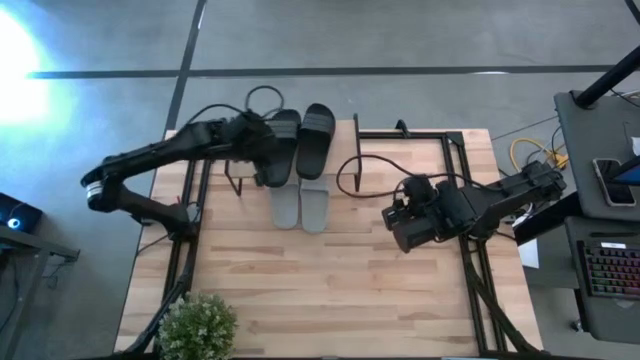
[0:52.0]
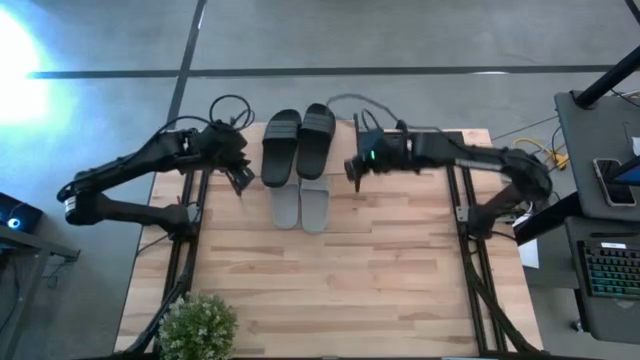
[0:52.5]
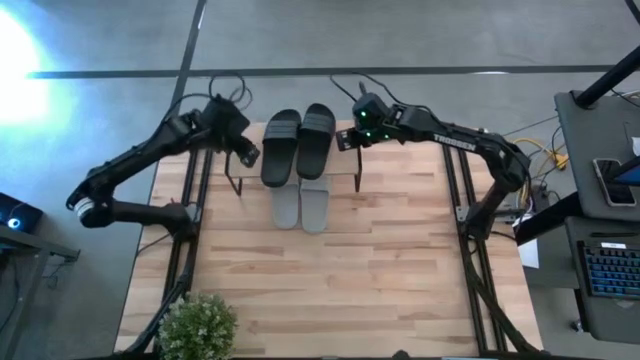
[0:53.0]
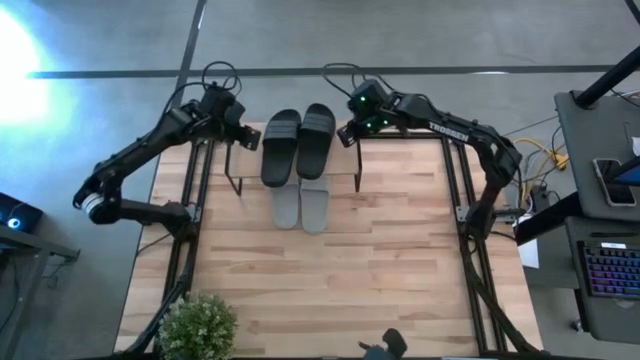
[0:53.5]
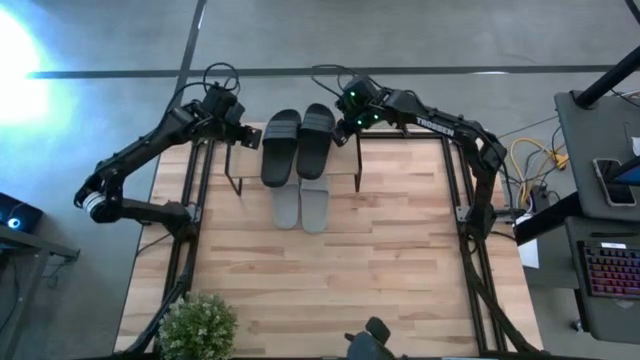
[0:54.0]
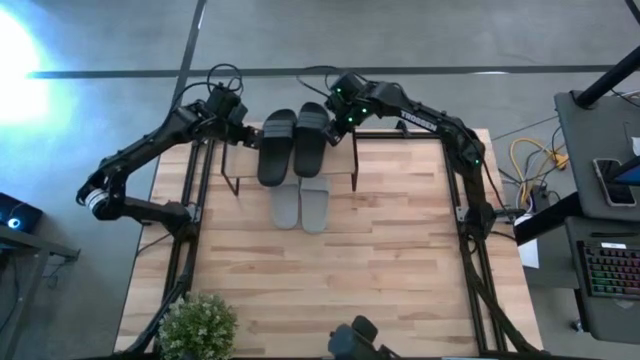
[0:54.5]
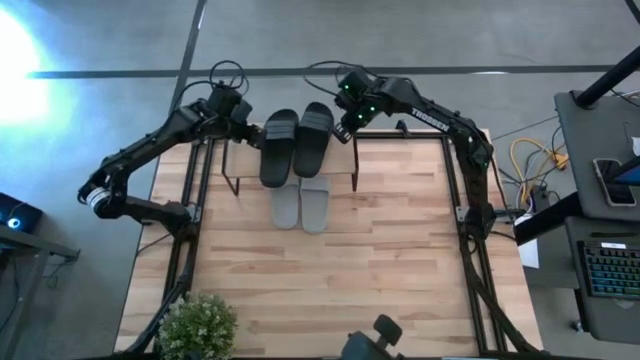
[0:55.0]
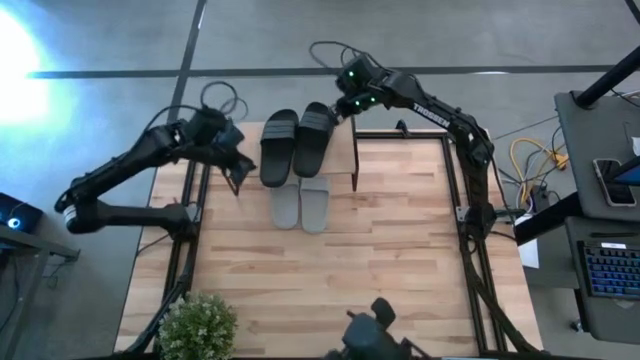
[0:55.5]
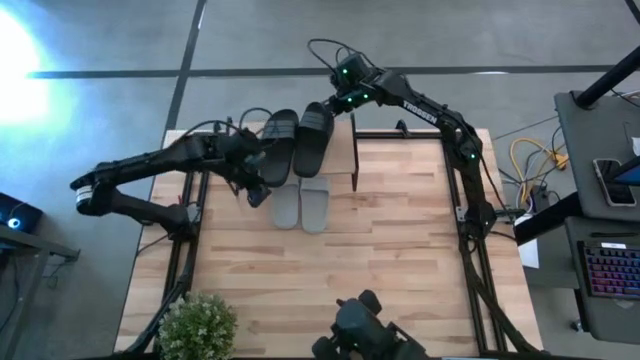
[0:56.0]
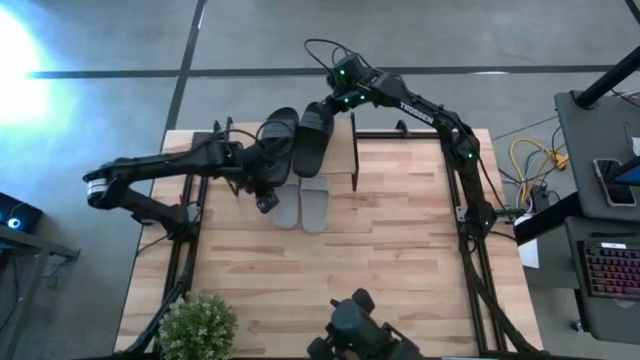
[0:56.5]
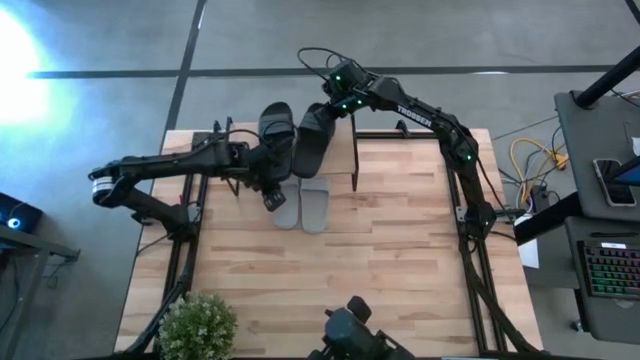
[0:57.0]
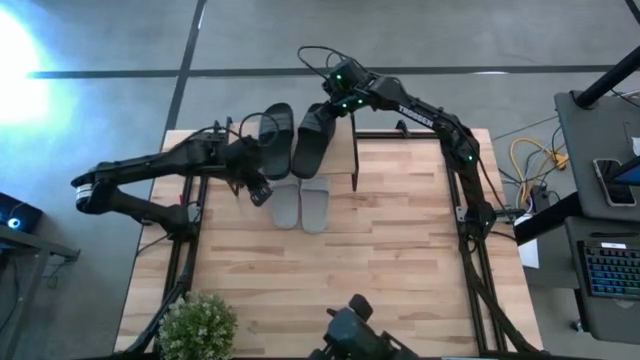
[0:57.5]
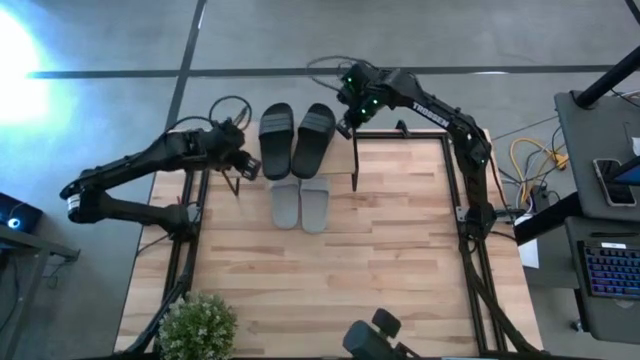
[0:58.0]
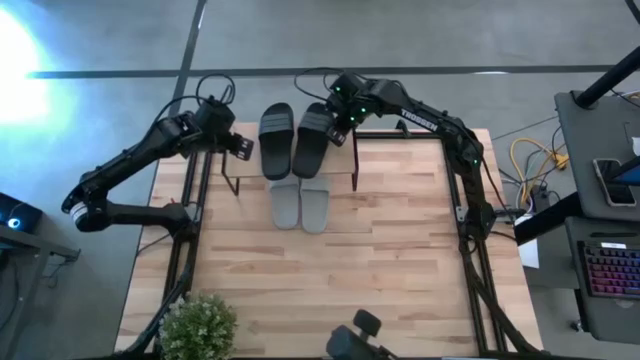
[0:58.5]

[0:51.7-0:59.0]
Task: Pick and place slides into the shelf
Adjust the black slides on the shelf

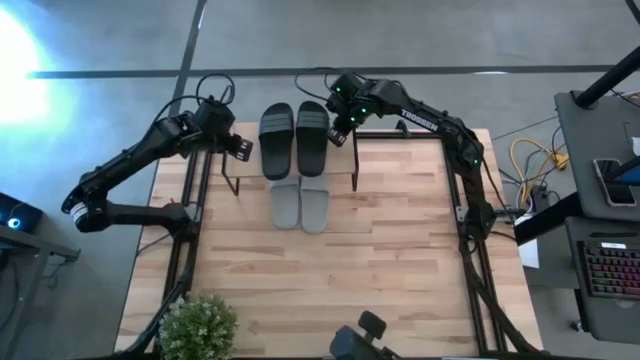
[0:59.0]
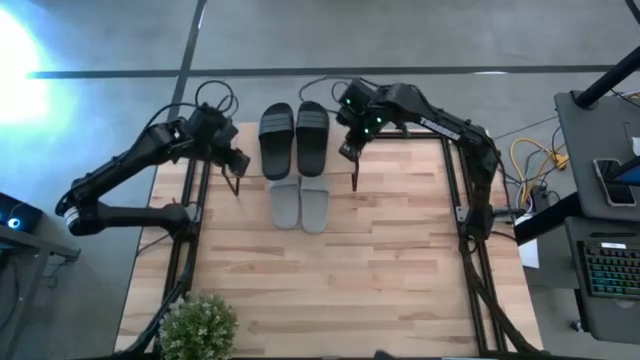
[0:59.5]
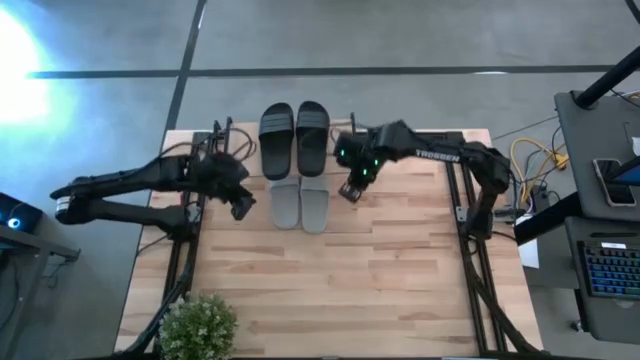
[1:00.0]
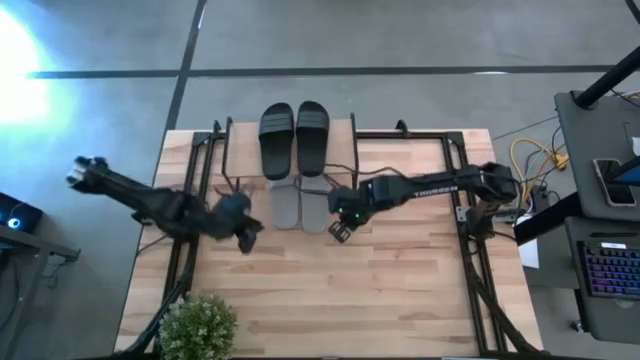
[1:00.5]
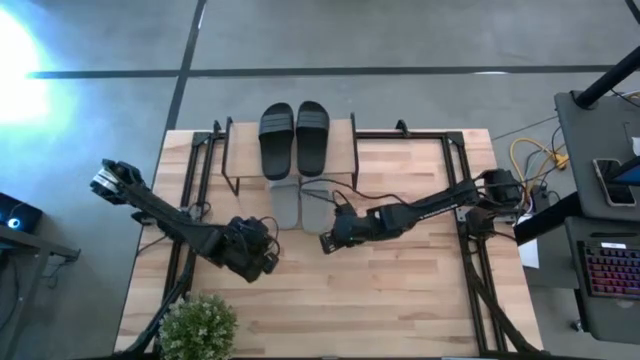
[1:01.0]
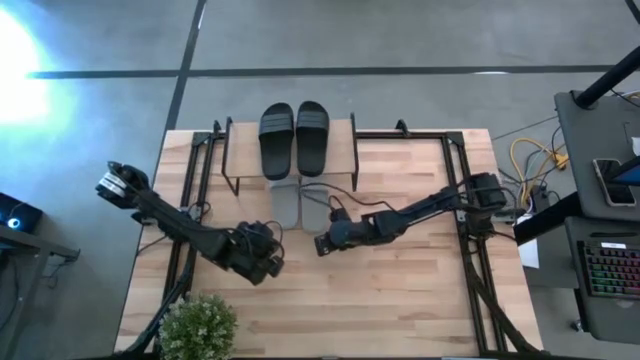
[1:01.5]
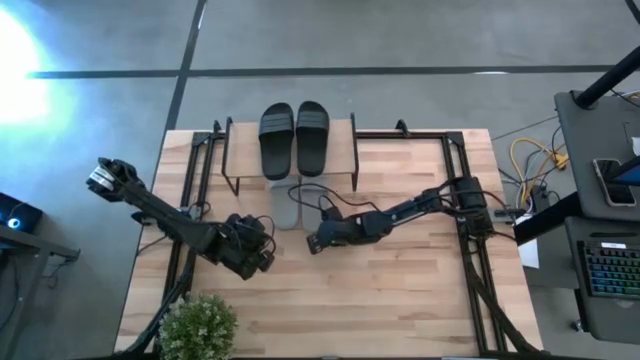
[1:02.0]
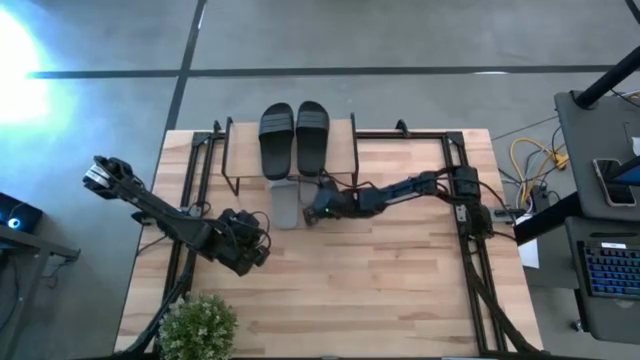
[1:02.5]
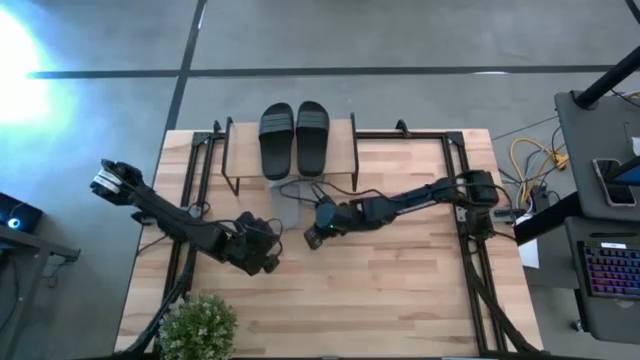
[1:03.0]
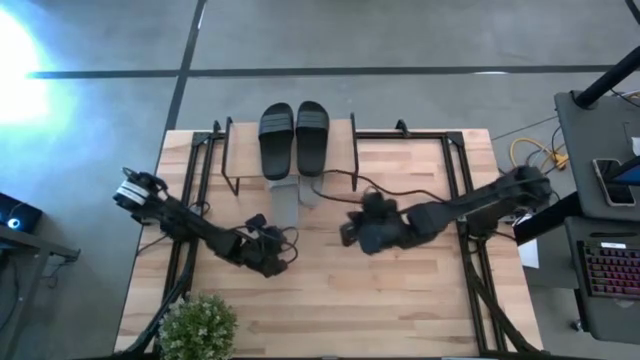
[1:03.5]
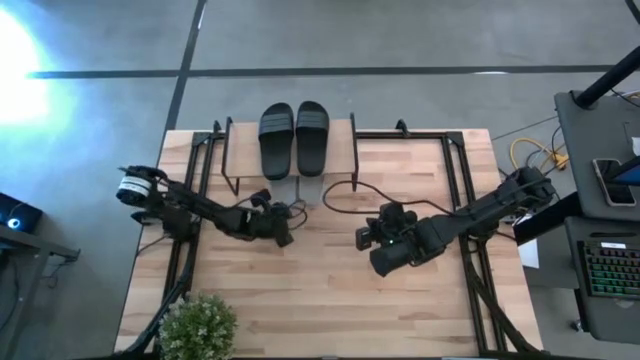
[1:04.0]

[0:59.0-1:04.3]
Adjust the gray slides under the shelf

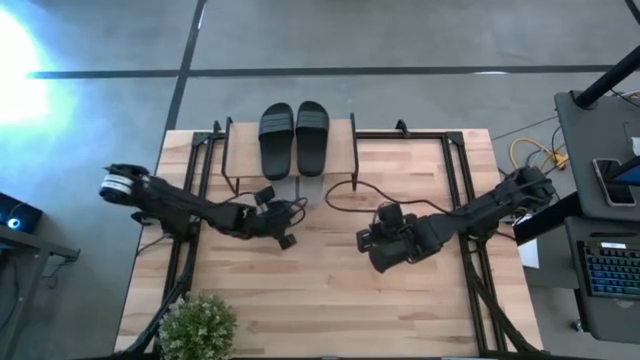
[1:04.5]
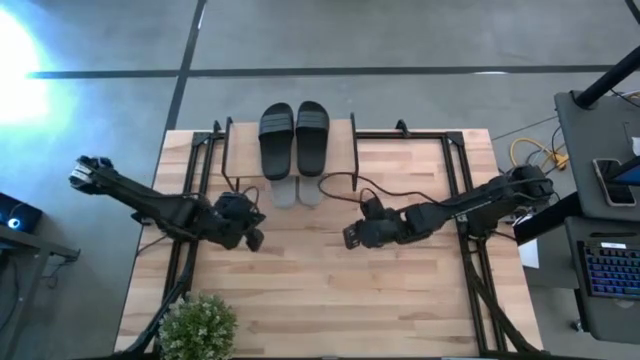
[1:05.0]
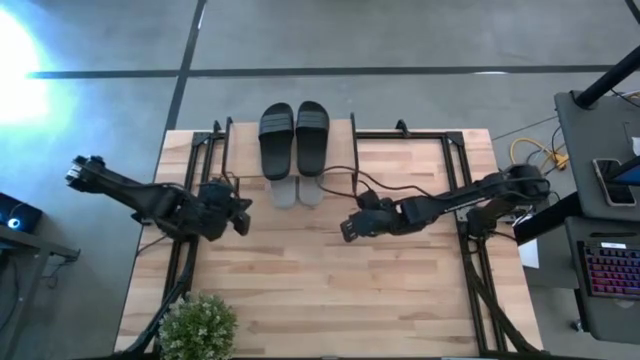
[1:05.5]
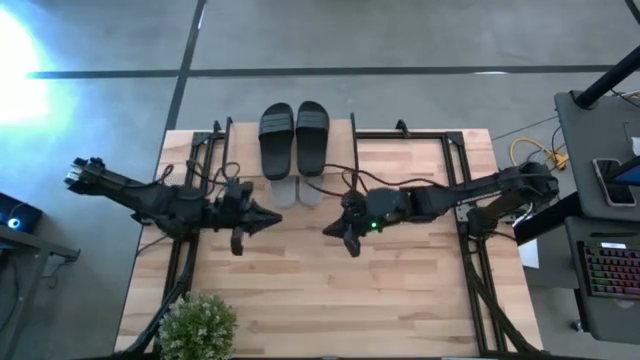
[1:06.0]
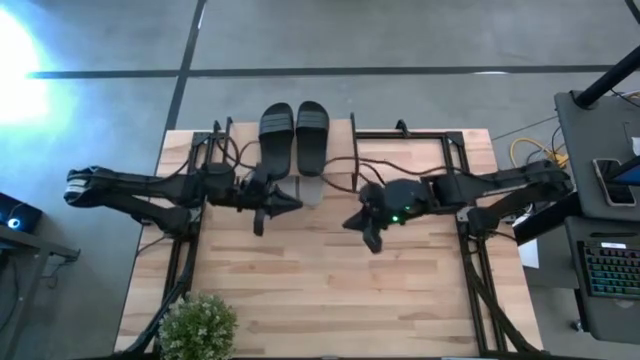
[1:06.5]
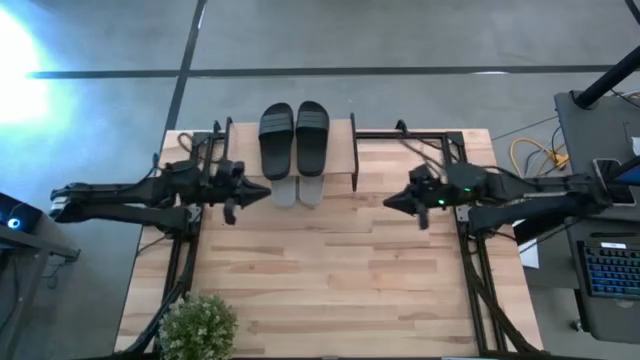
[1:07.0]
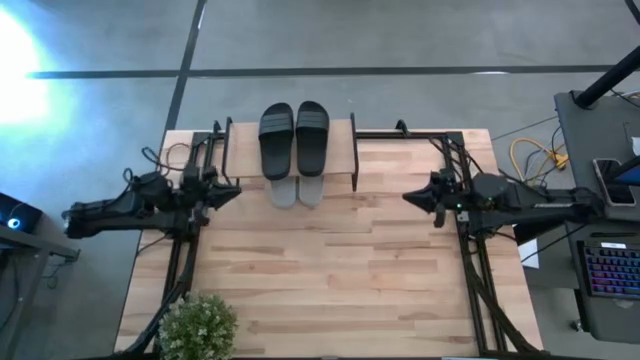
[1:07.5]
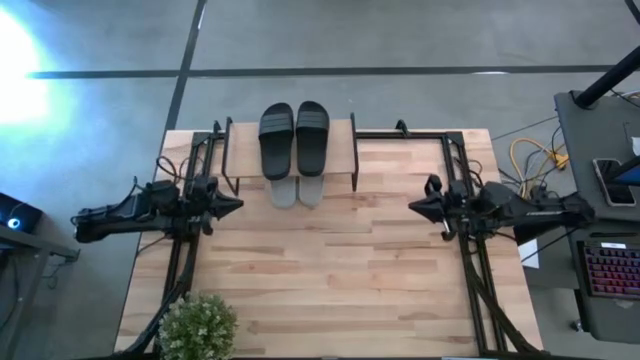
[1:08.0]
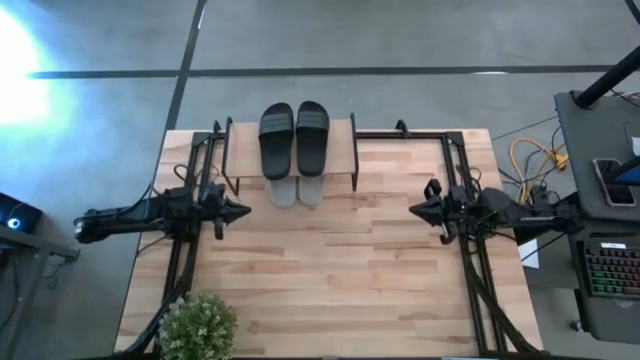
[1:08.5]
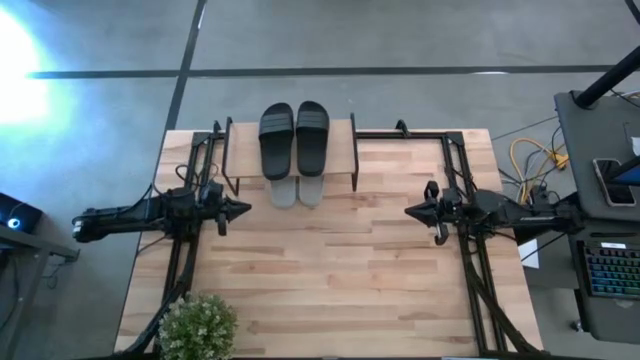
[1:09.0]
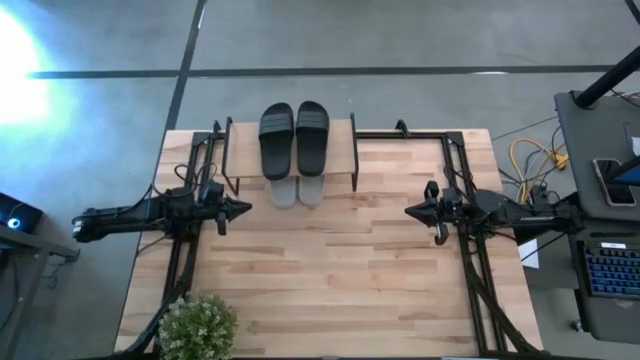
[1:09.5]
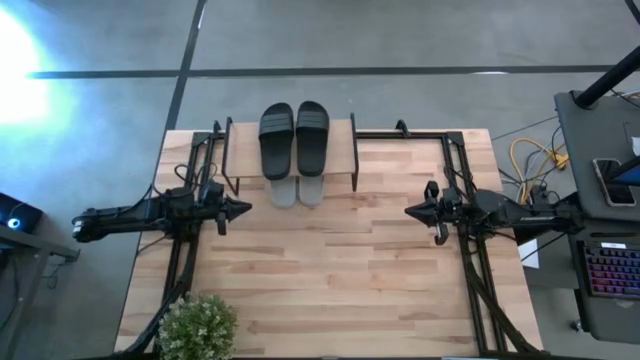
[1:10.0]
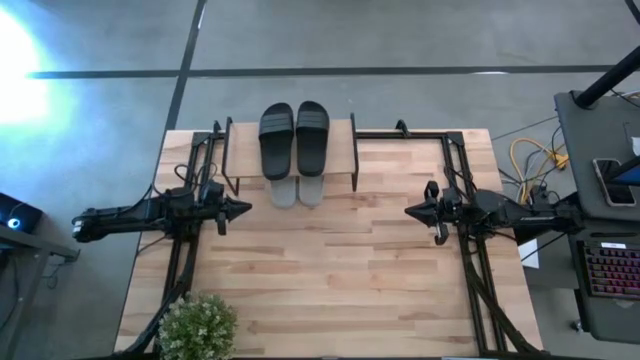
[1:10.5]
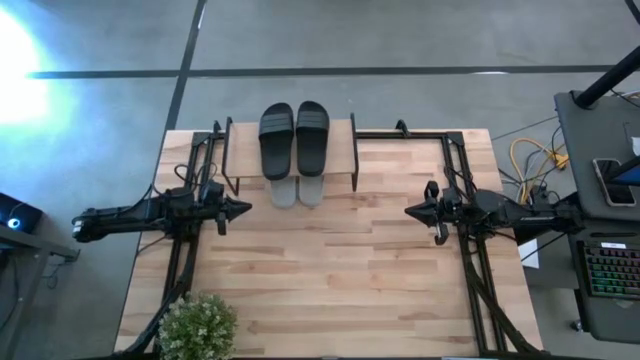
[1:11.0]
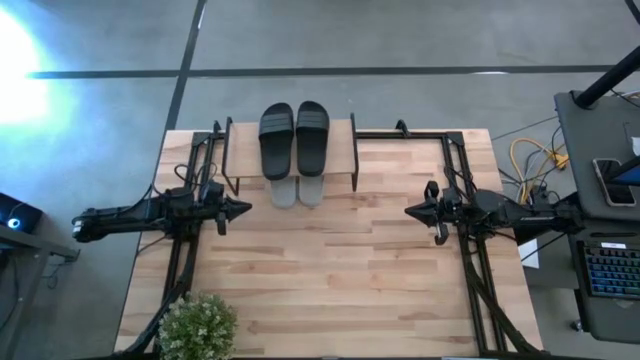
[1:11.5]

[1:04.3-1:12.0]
Return to Home Position

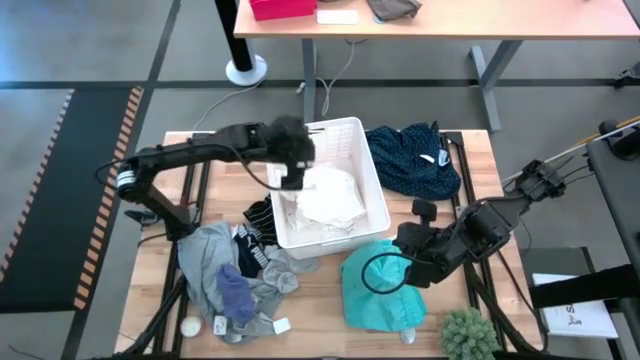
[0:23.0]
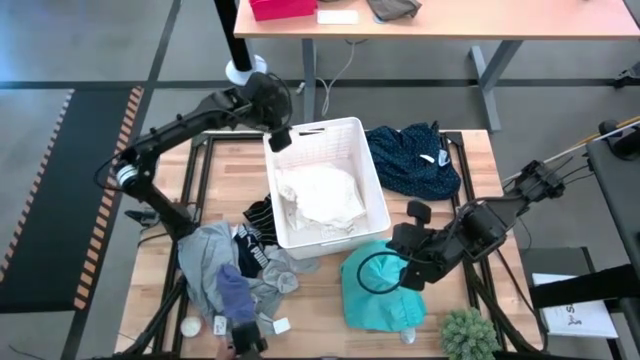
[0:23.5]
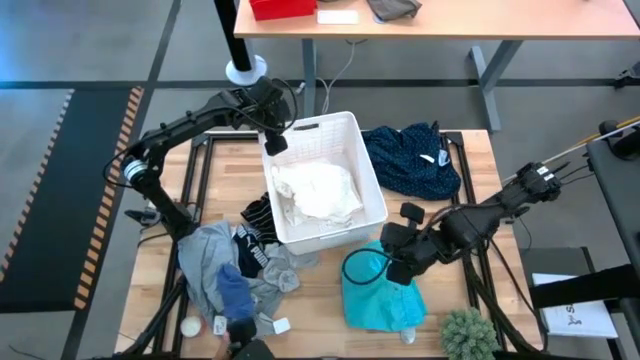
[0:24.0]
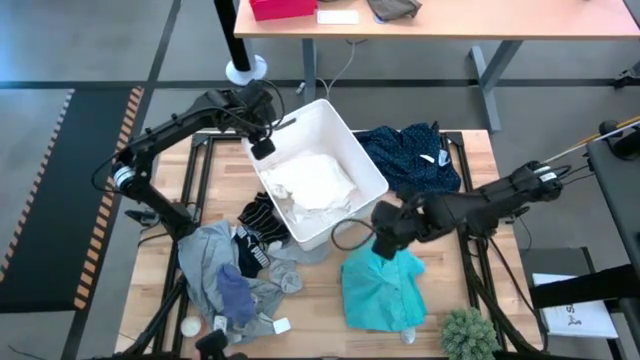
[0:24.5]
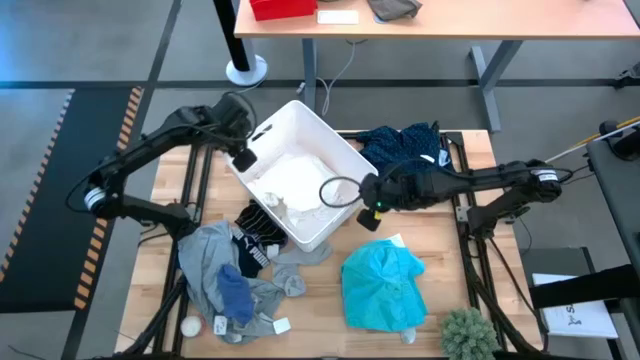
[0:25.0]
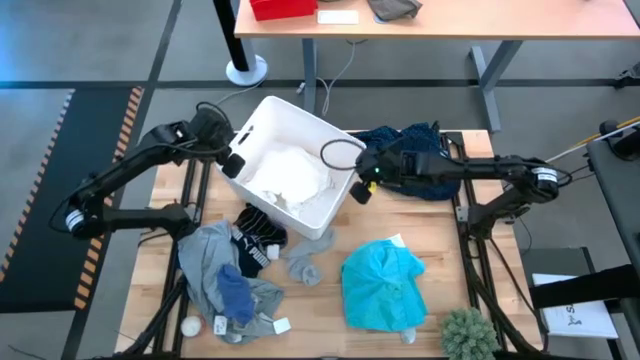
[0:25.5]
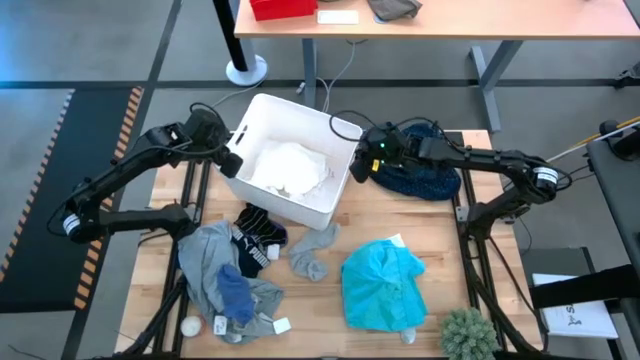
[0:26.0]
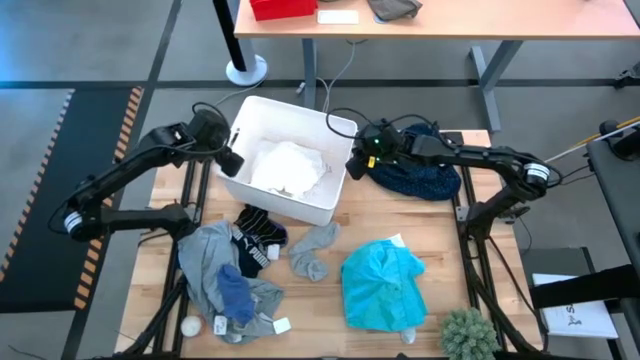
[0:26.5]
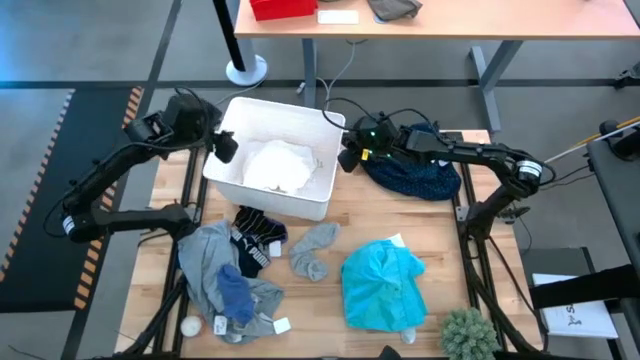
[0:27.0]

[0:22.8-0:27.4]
Task: Sort clothes
Move the white bin to the top left of the table
